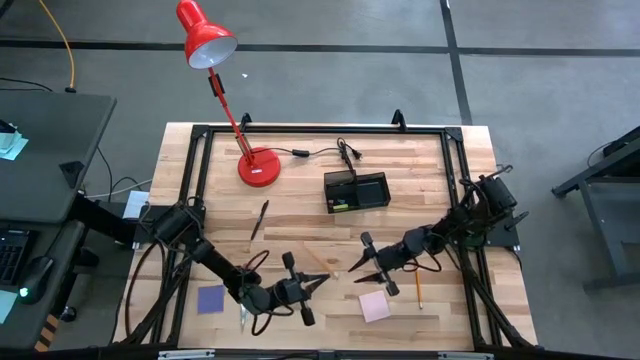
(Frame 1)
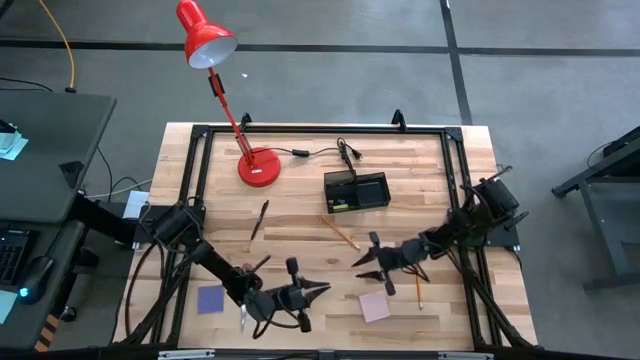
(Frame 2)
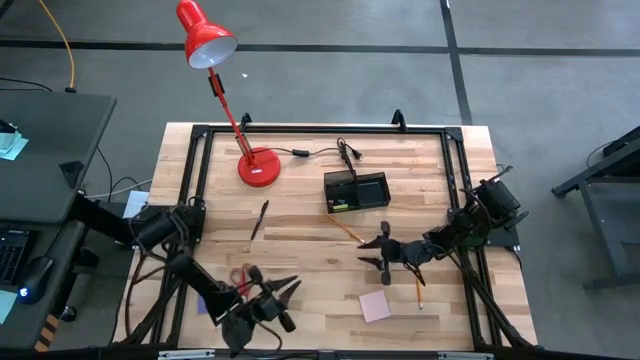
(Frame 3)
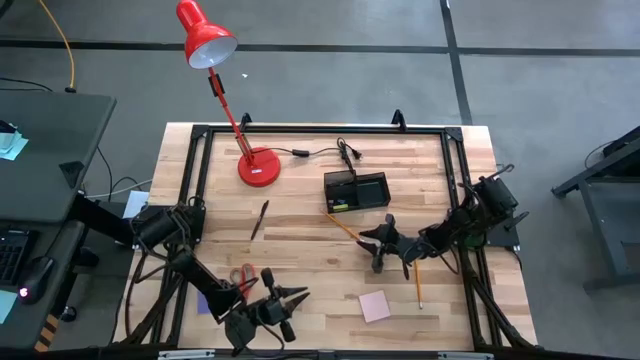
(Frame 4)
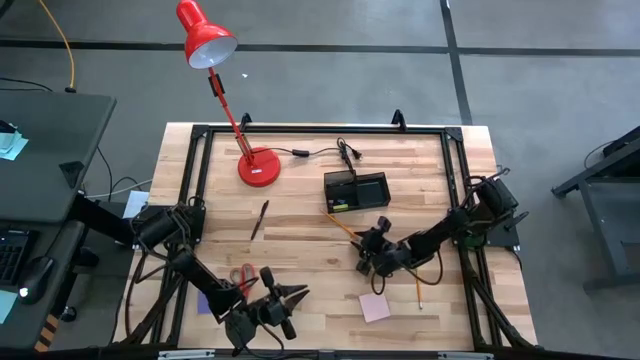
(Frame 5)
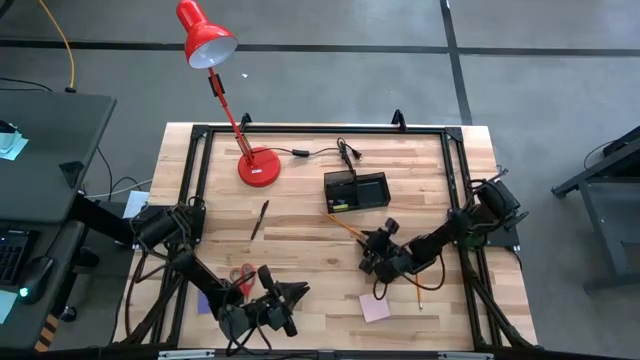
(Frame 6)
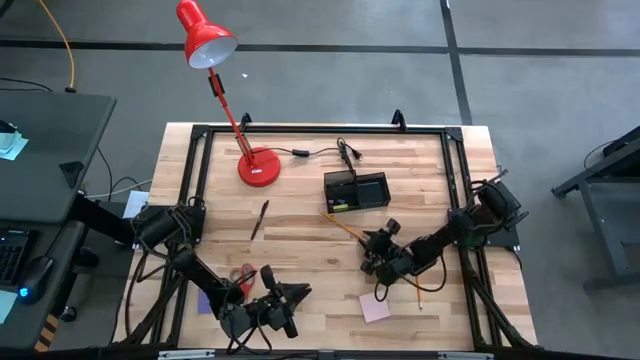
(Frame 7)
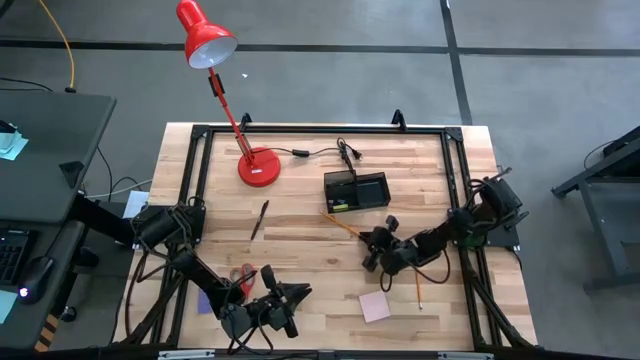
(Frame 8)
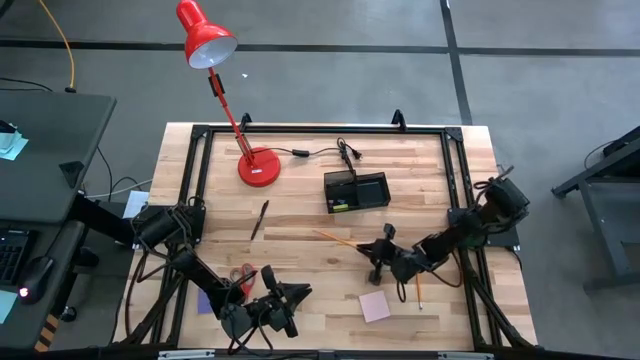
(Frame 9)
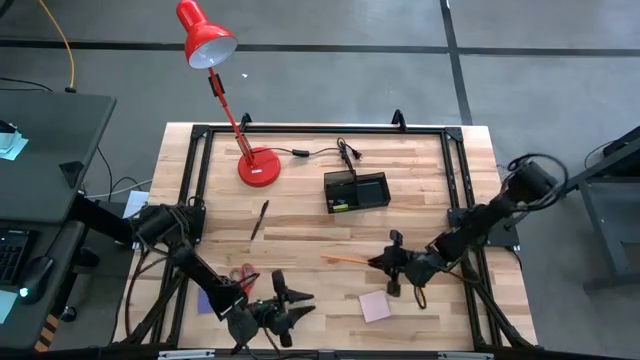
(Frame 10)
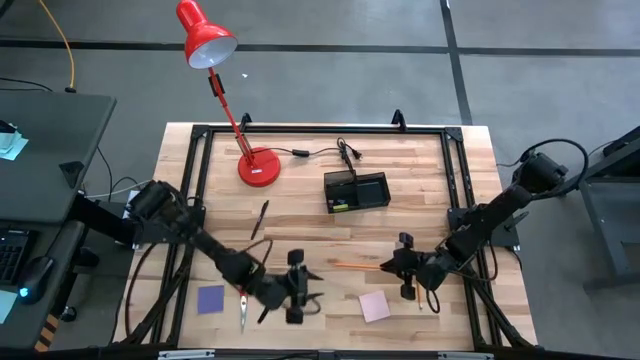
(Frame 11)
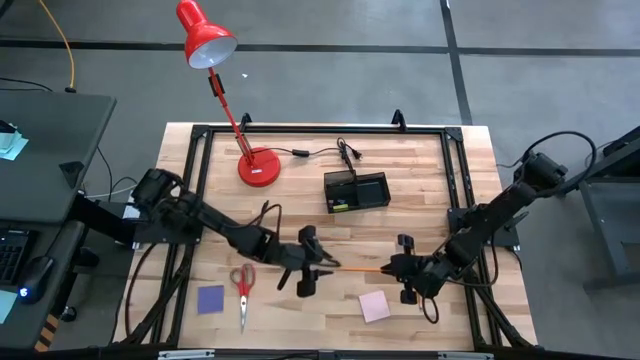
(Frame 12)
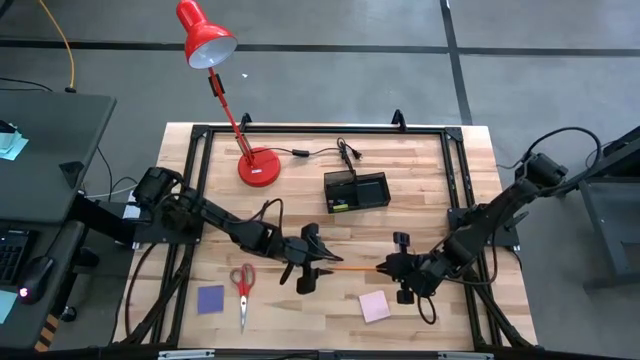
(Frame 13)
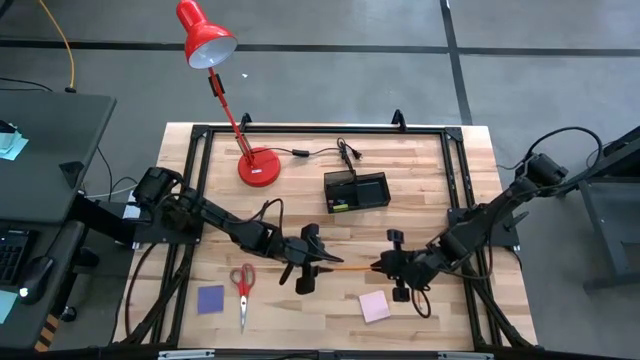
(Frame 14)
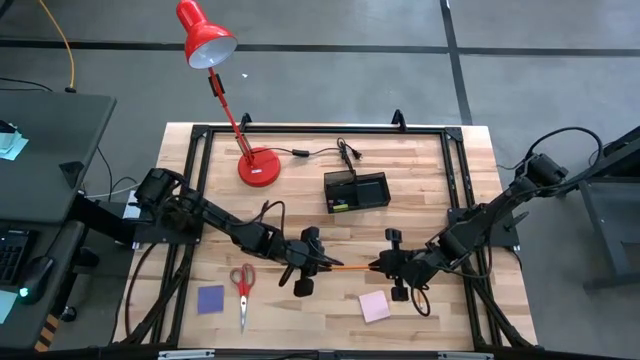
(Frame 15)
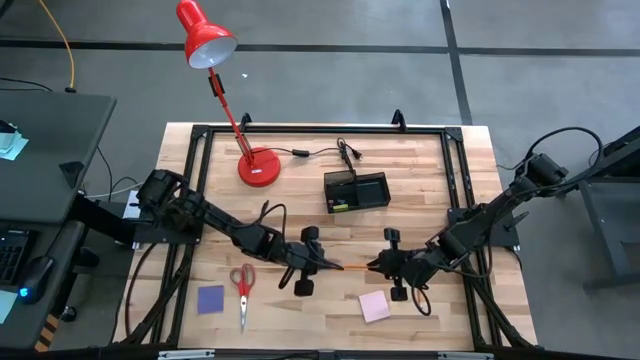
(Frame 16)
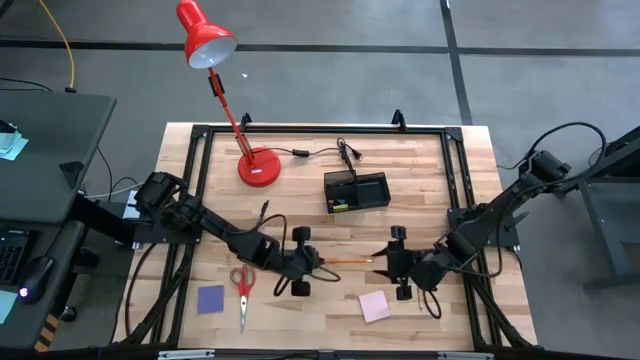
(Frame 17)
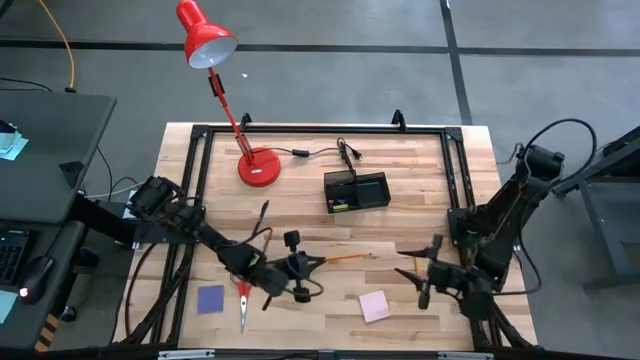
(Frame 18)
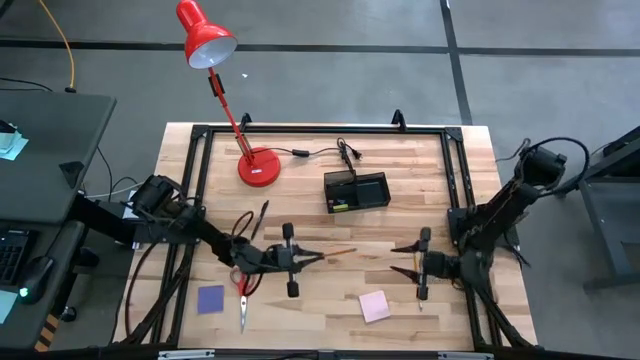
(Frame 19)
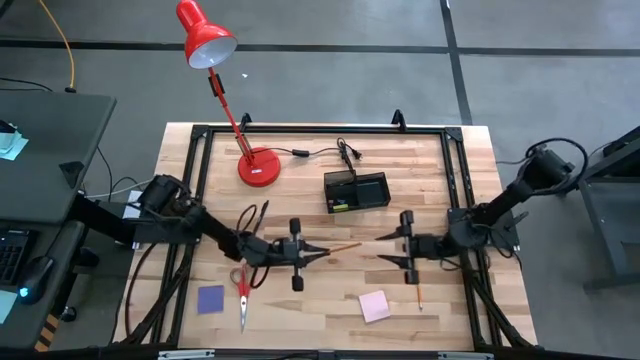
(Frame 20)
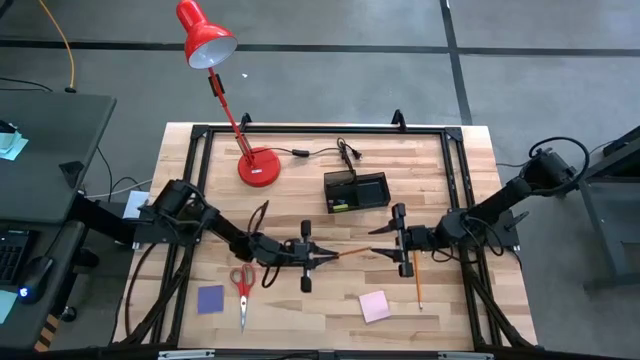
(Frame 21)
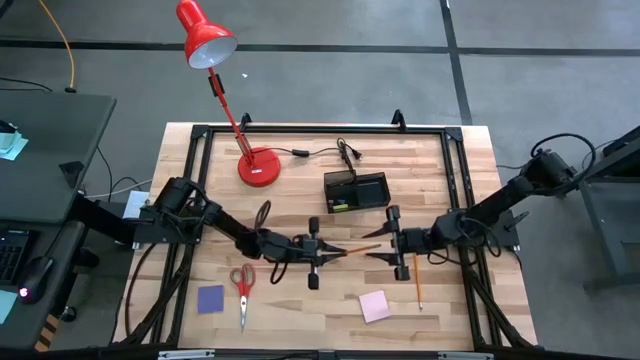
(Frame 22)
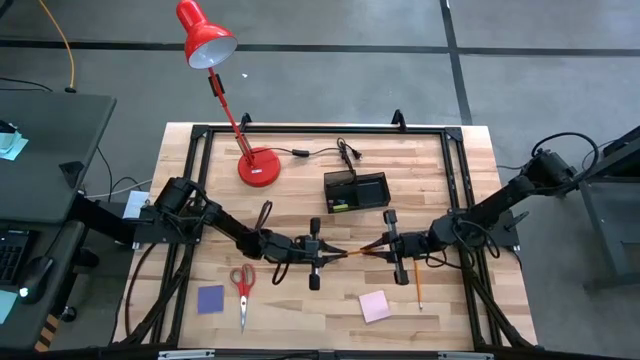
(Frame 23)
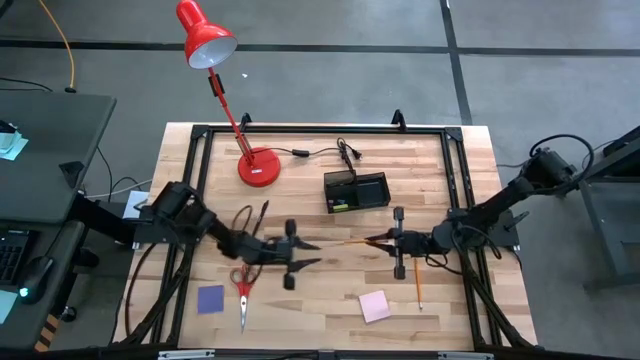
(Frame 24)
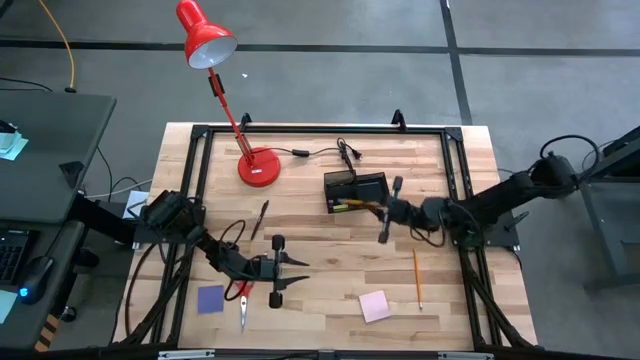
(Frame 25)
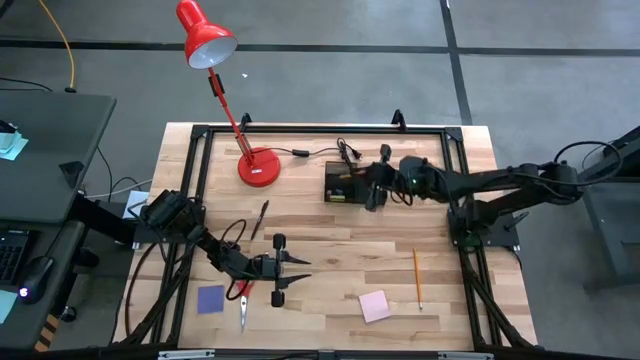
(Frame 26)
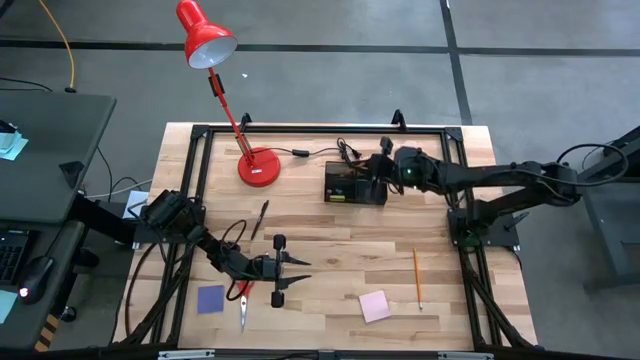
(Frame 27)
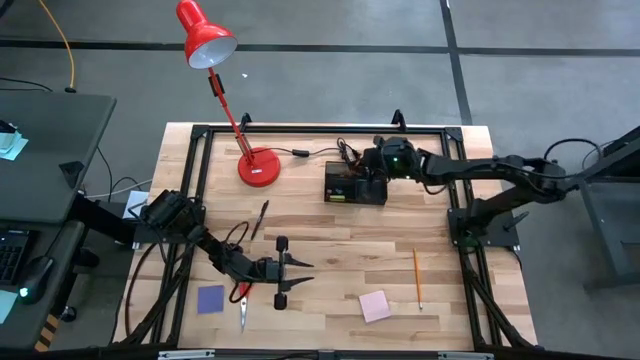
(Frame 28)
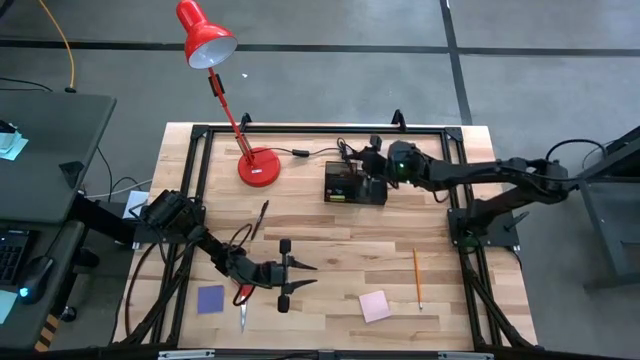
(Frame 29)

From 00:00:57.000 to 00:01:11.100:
Task: Pick and place office supplies into organizer
Put the left orange pencil into the desk organizer
